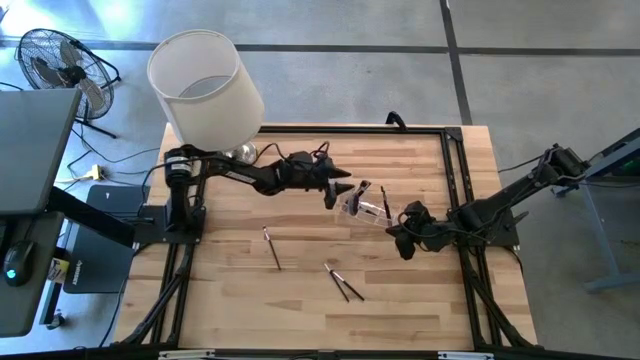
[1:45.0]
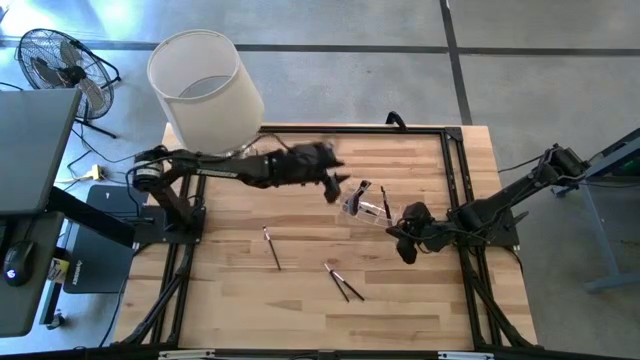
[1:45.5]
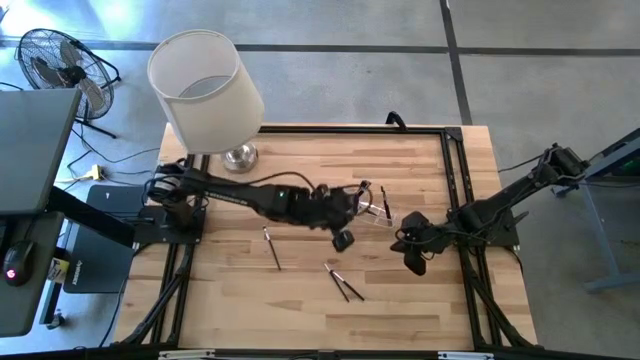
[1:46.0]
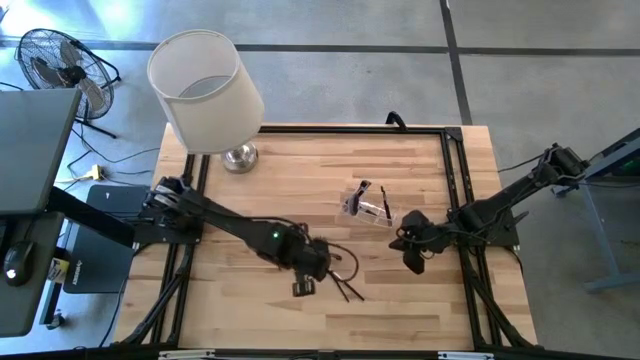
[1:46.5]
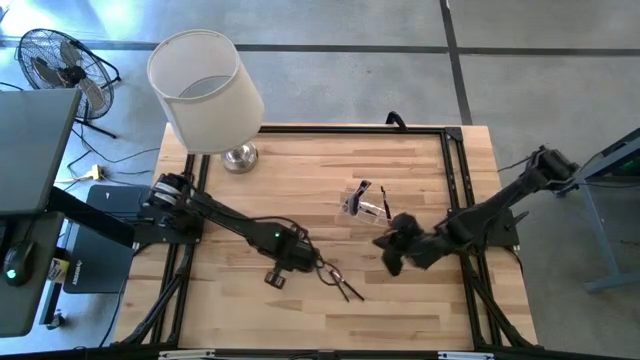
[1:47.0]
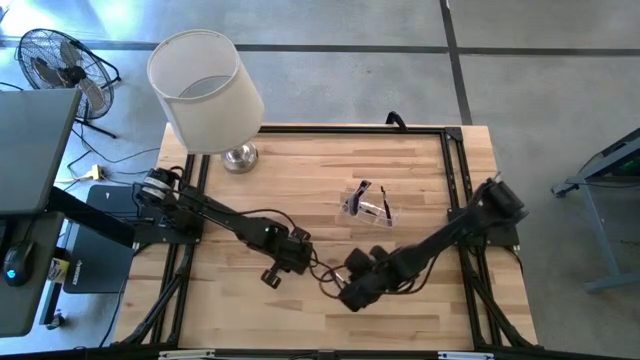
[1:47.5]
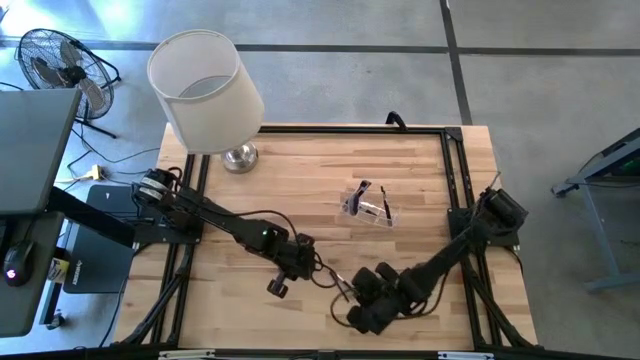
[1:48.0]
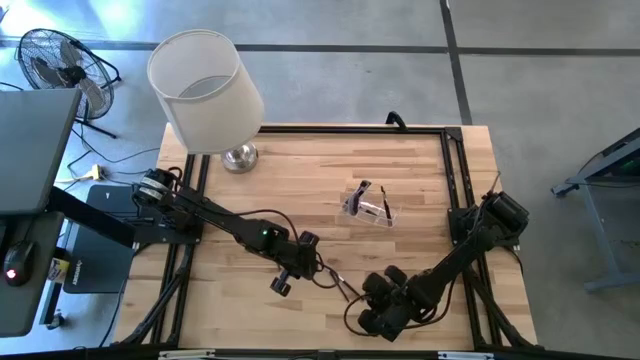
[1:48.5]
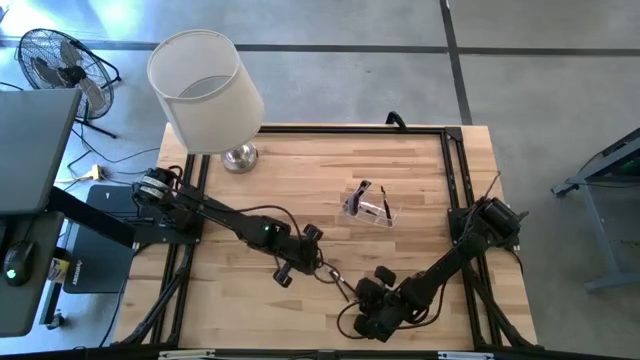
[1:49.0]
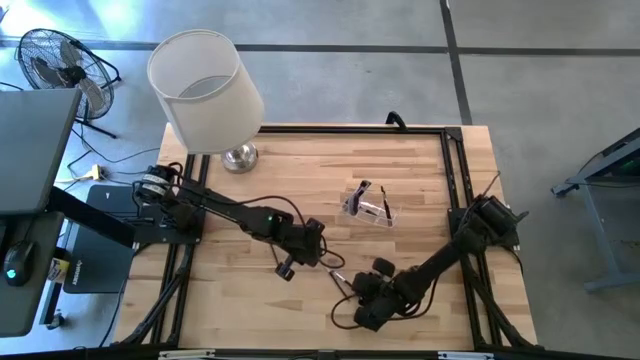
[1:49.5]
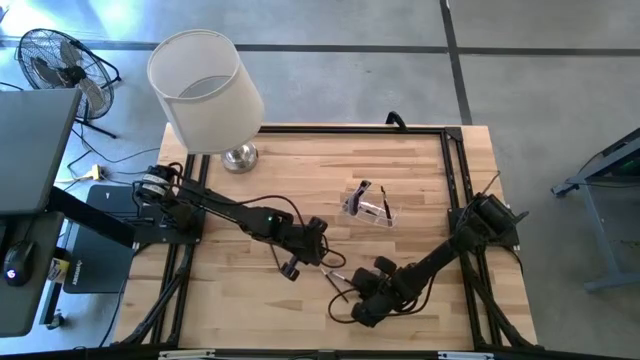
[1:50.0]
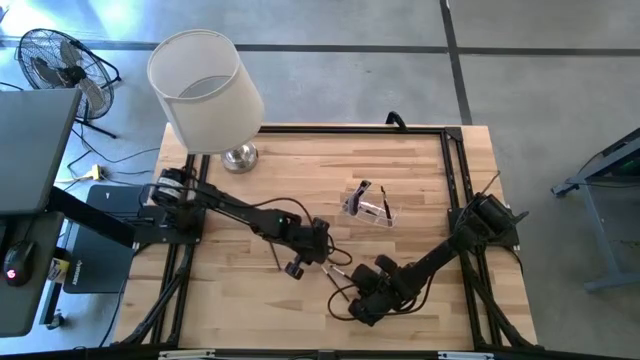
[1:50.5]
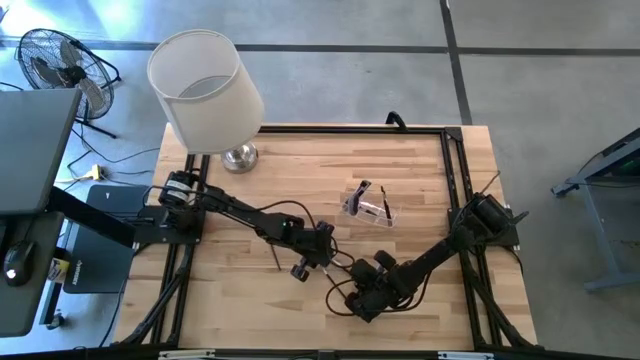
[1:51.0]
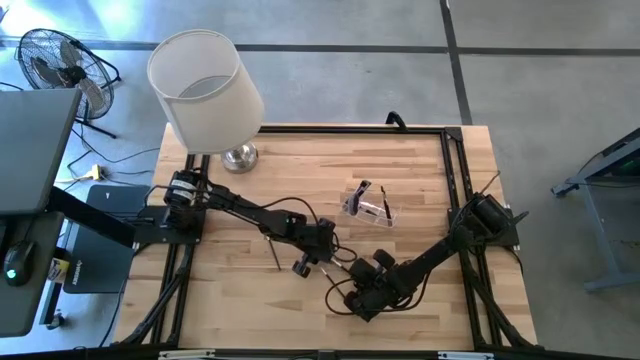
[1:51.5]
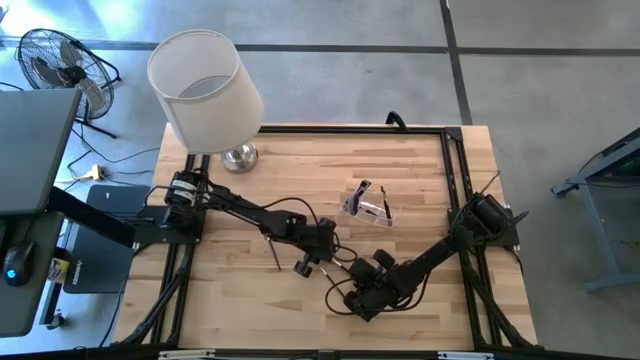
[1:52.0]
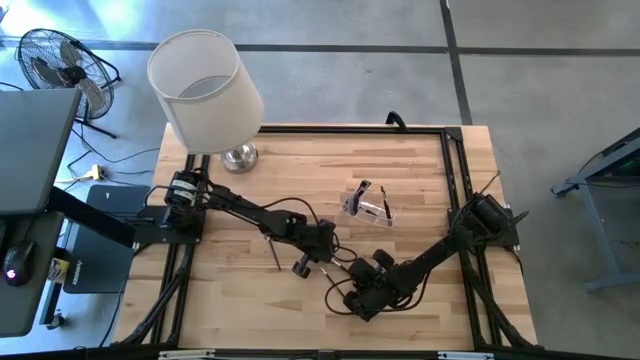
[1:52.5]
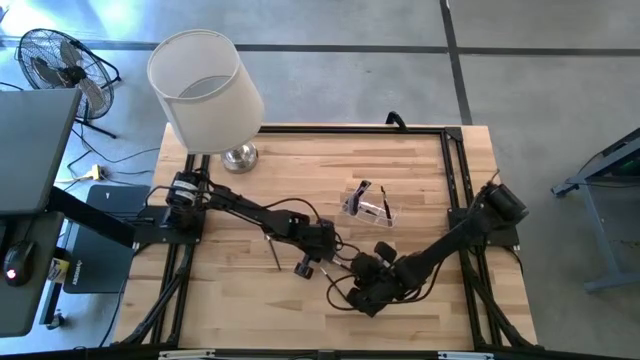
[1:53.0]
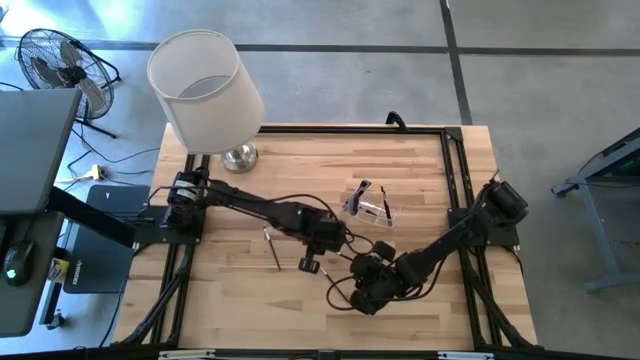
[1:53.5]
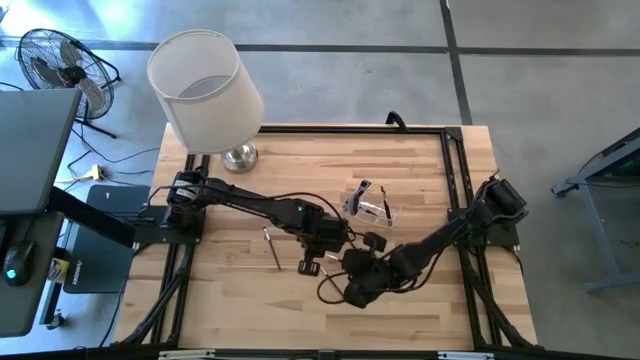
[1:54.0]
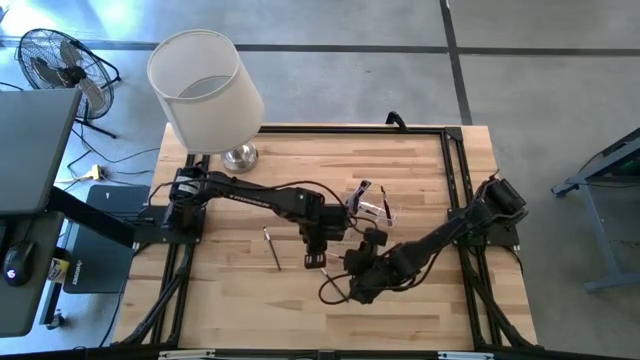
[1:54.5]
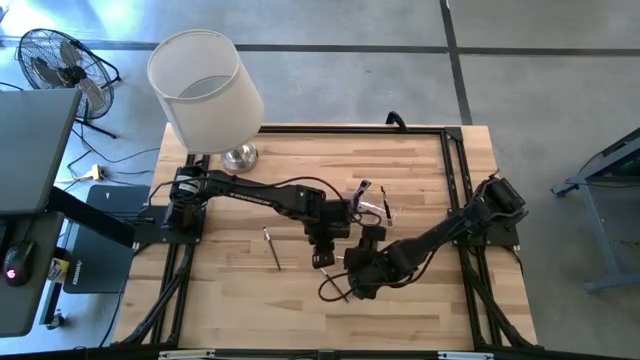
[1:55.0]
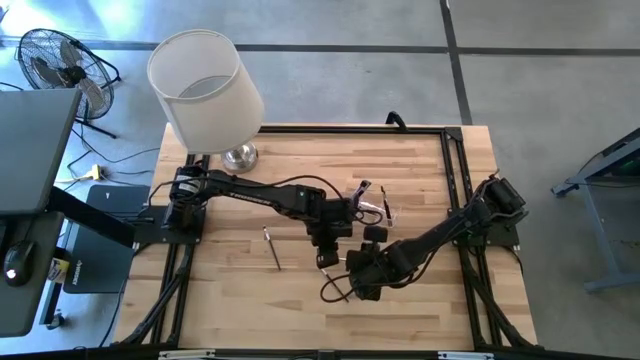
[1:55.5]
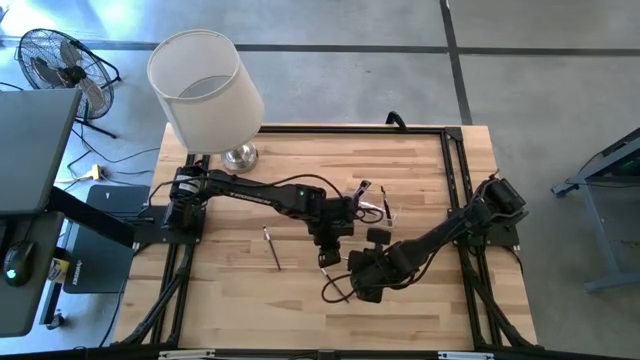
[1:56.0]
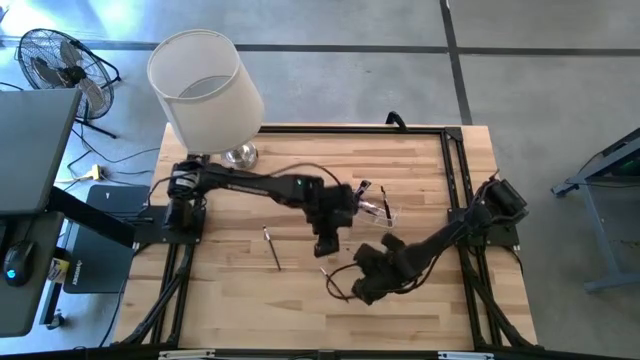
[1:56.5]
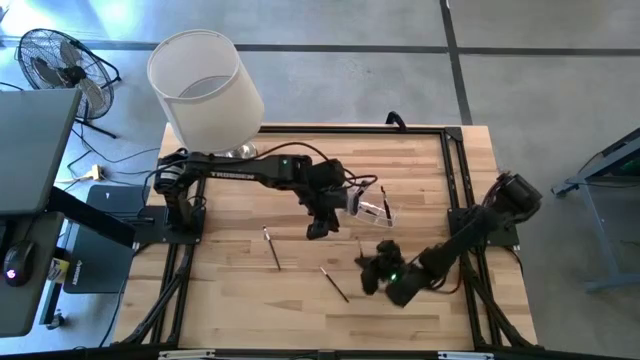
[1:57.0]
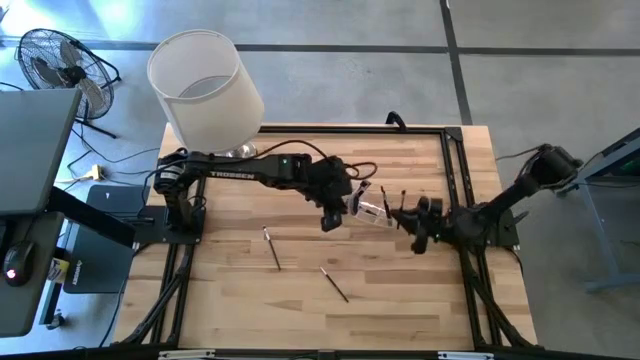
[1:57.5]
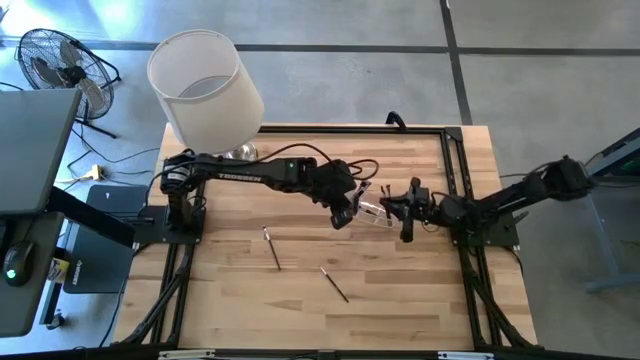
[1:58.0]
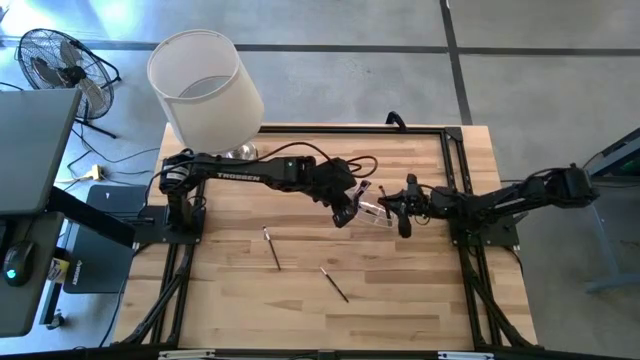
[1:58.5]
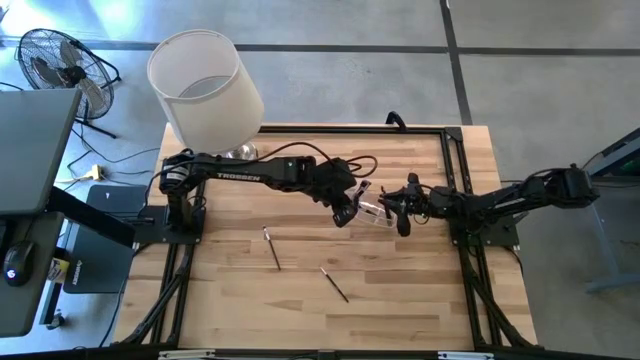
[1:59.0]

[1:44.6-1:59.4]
Task: Put items in baskets/containers
Put the black eyeshadow brush into the transparent organizer

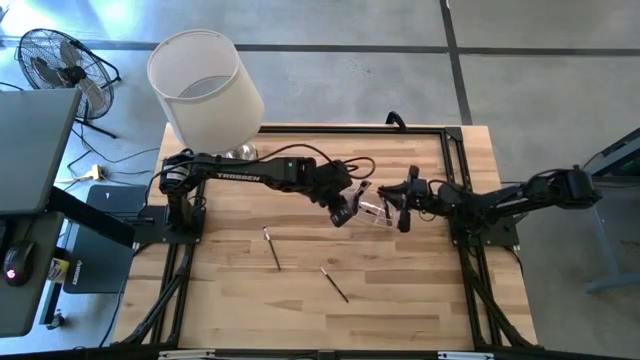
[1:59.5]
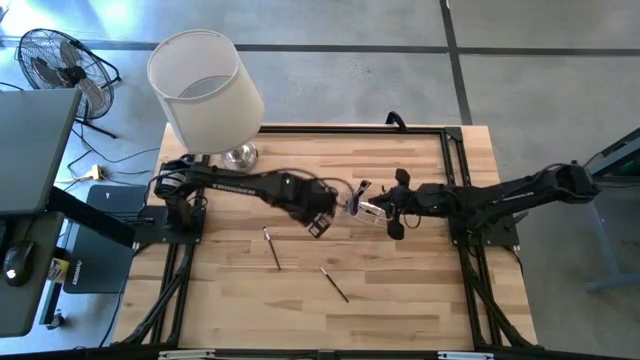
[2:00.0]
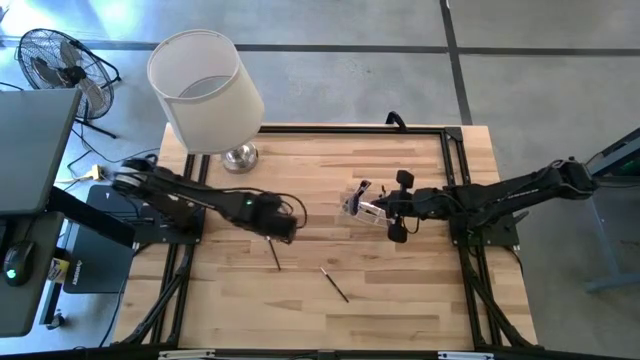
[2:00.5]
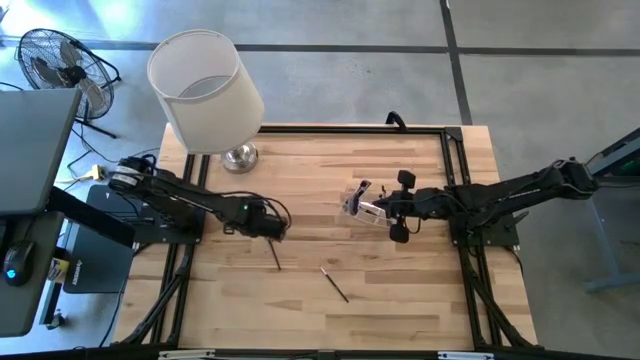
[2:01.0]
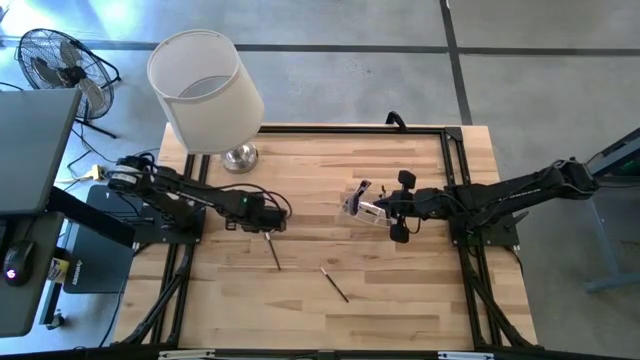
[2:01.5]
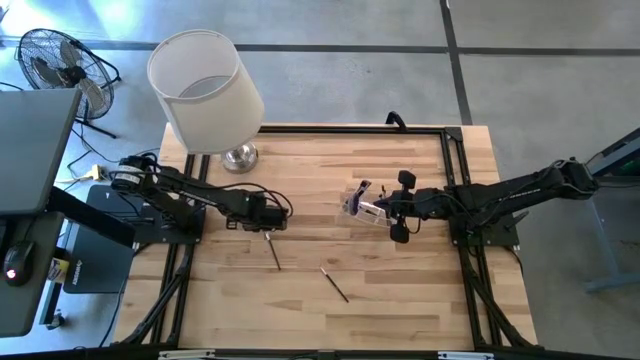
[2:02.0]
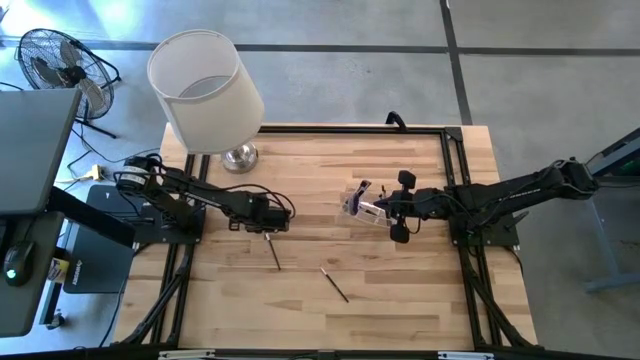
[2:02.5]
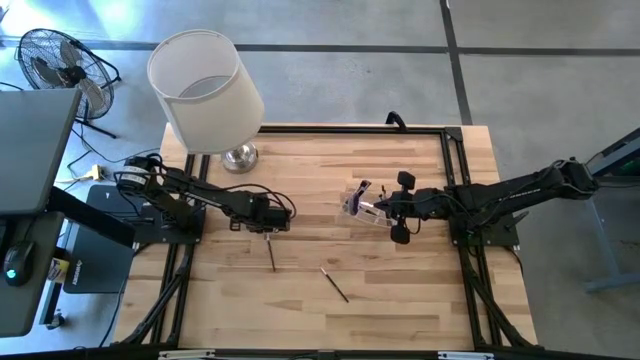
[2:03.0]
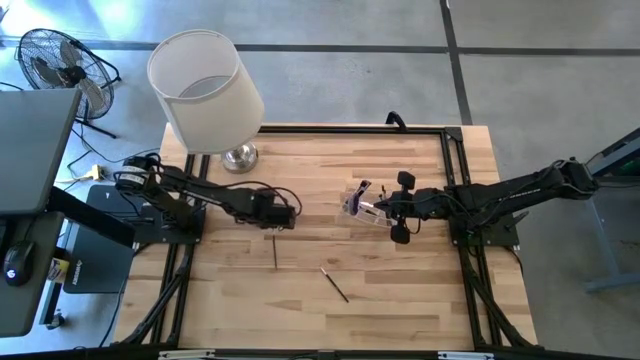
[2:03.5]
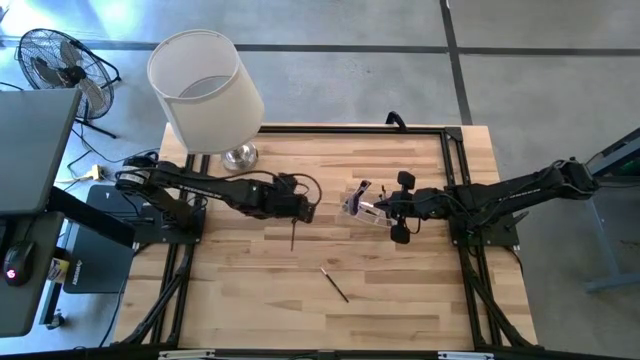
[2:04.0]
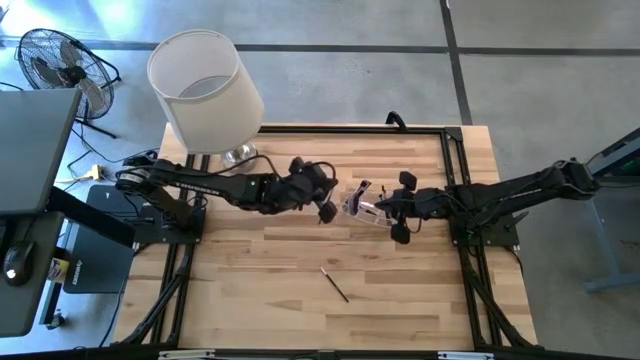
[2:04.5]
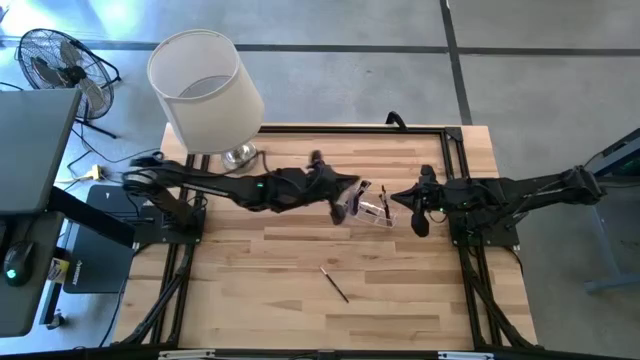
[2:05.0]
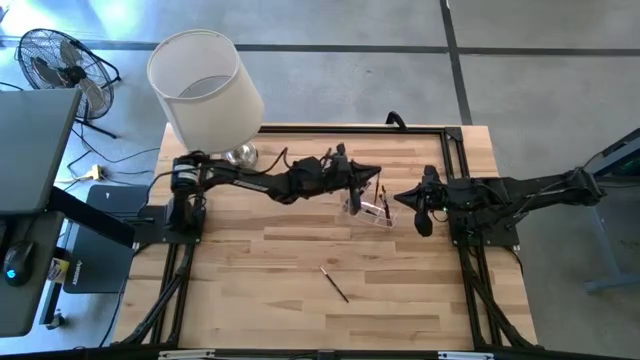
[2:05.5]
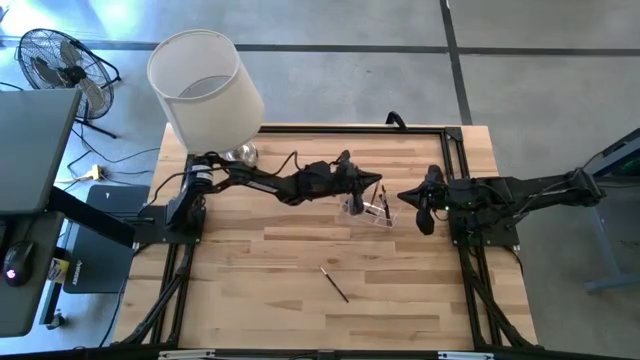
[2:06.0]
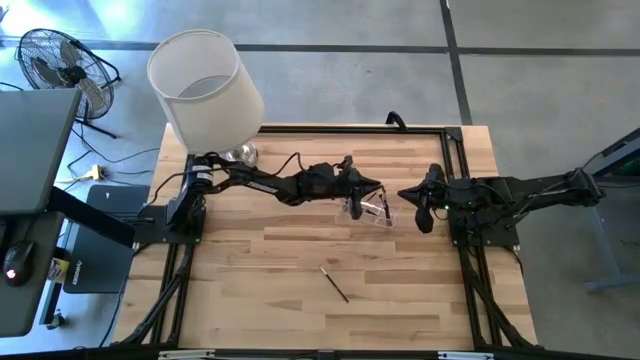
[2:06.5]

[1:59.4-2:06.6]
Put the black eyeshadow brush into the transparent organizer
